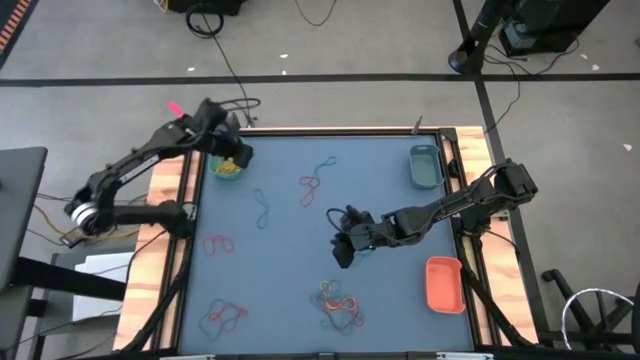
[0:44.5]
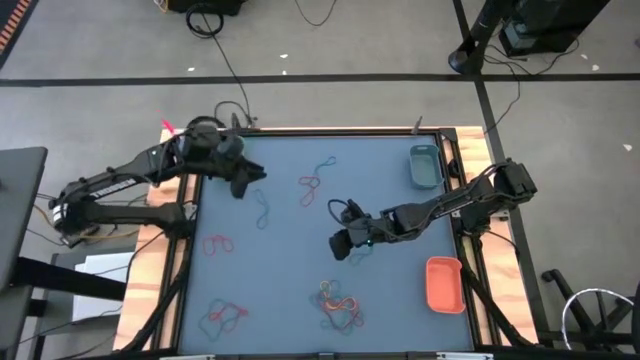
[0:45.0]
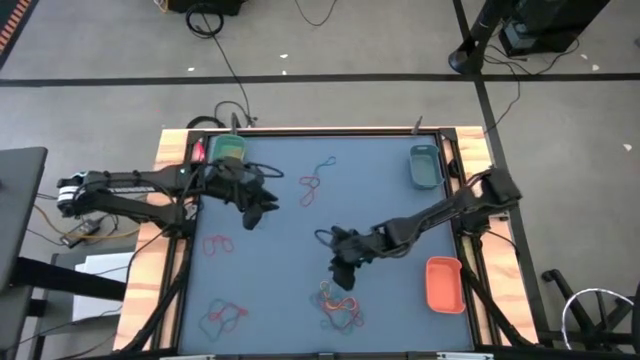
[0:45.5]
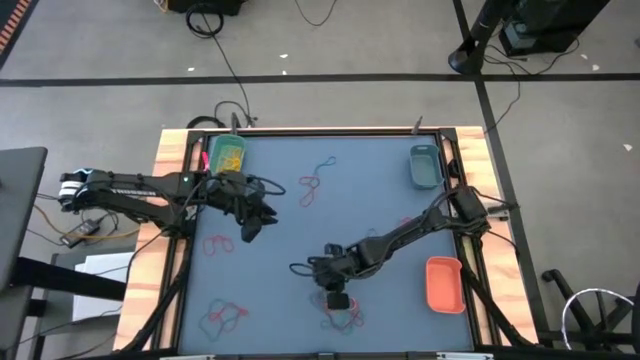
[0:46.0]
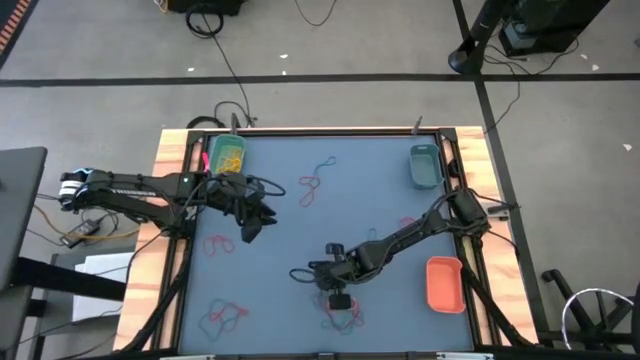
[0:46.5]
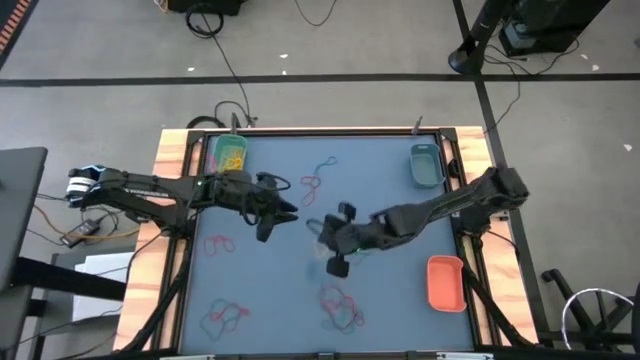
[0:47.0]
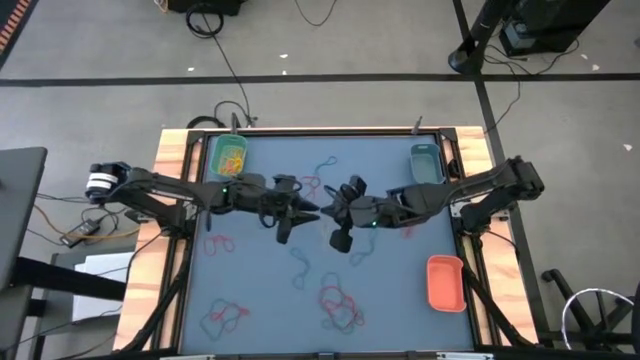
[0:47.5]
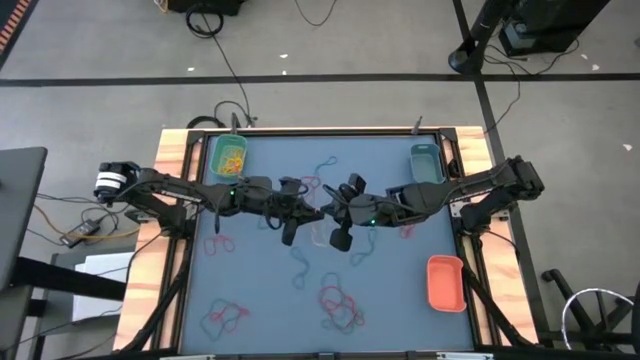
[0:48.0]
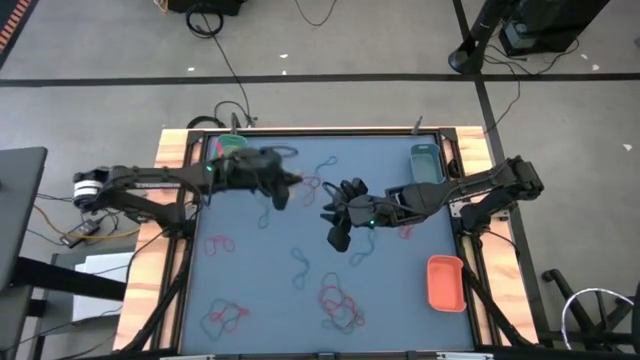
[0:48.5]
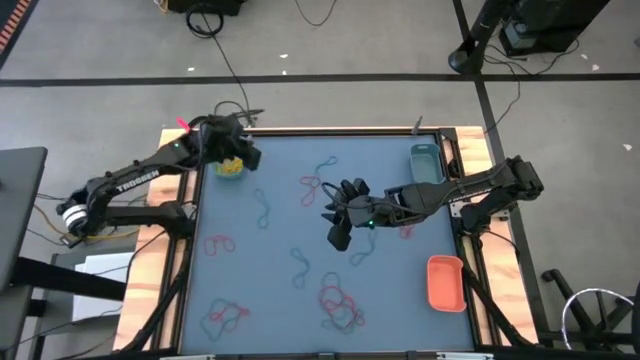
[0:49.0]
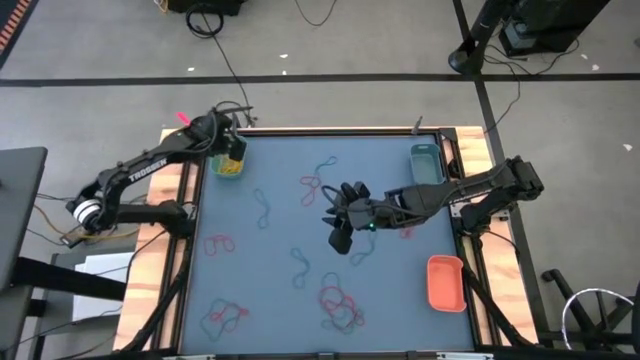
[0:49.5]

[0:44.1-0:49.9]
Task: Sort rubber bands into baskets
Put the yellow rubber band into the green bin

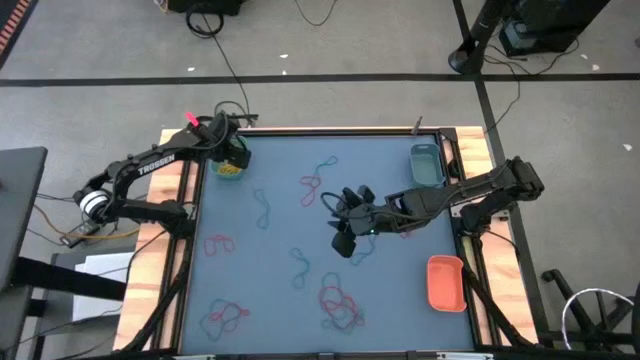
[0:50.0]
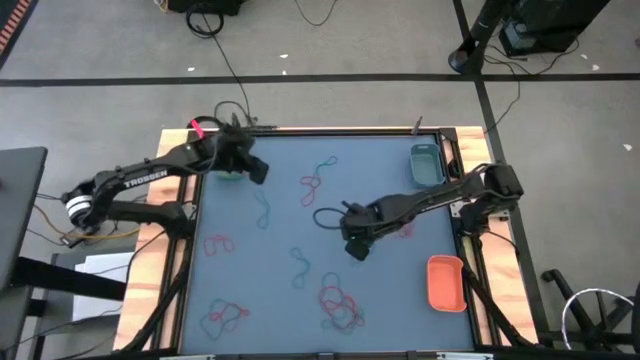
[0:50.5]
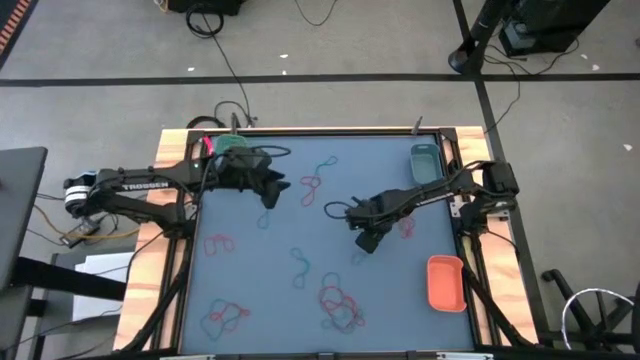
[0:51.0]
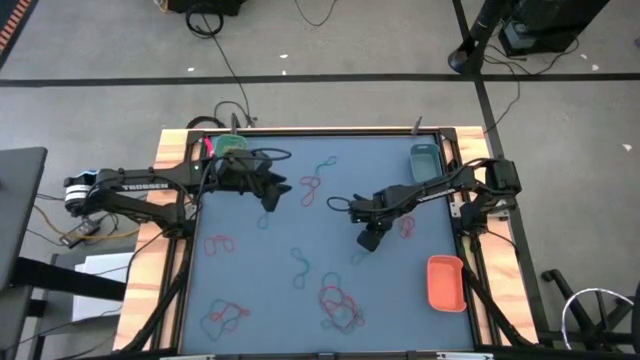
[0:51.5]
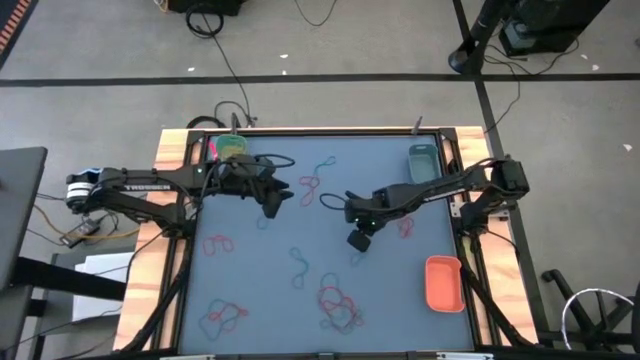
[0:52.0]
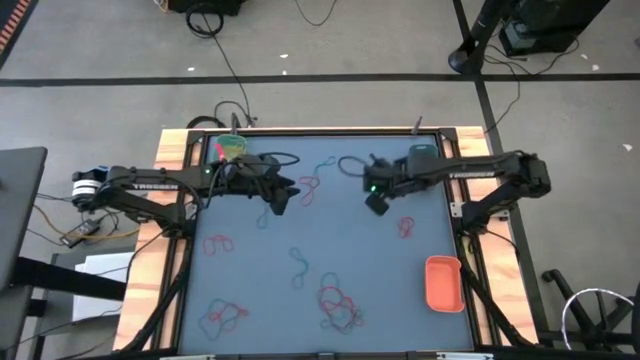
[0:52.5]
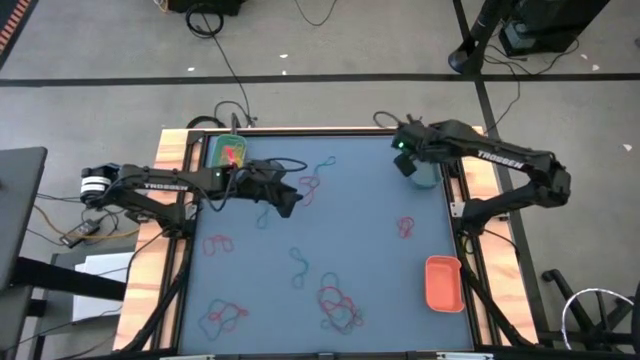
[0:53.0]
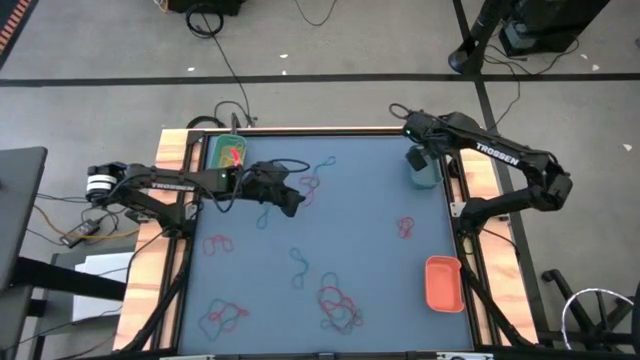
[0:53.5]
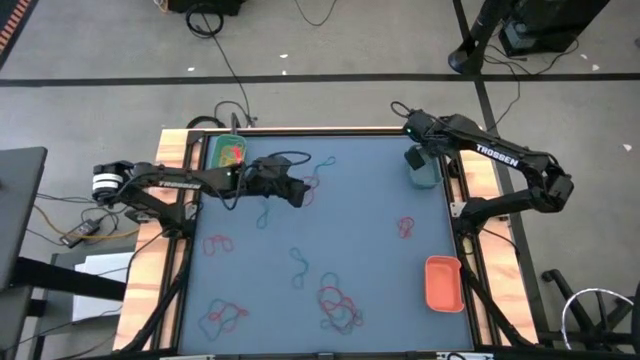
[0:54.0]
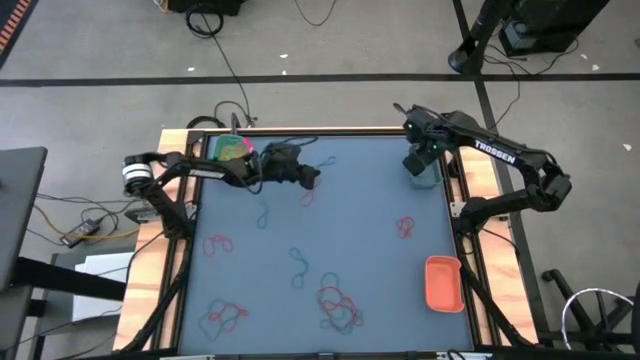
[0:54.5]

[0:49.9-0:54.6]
Put the blue rubber band into the blue bin

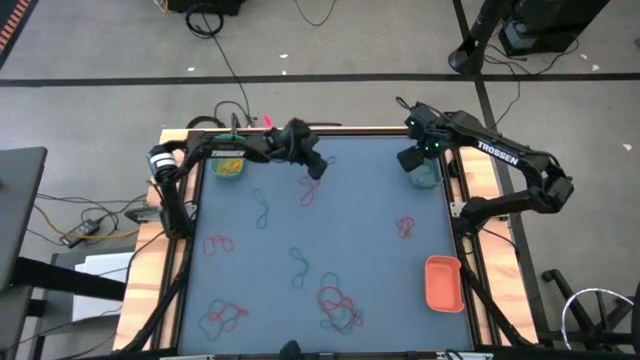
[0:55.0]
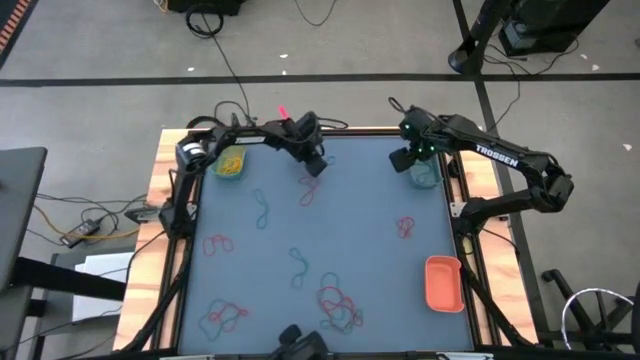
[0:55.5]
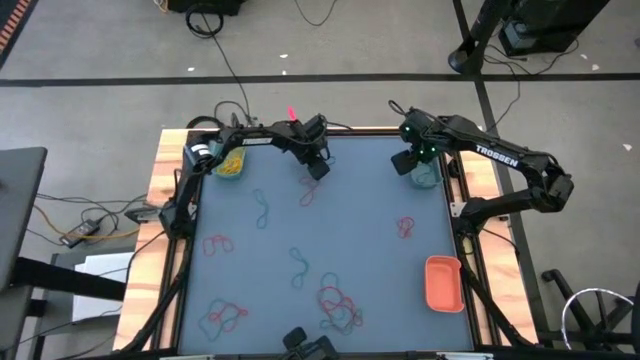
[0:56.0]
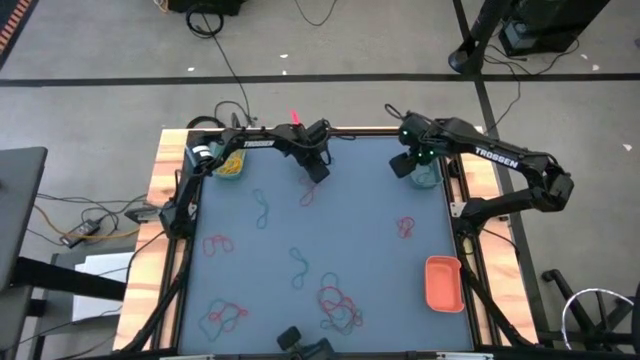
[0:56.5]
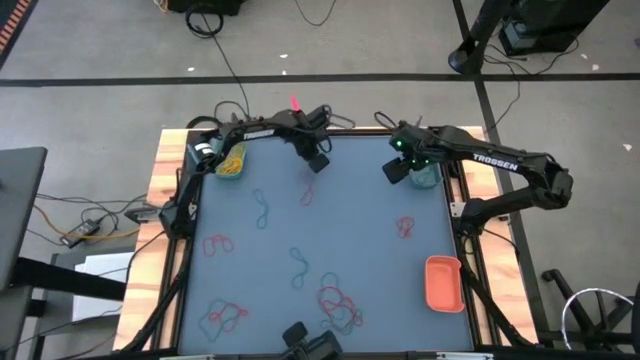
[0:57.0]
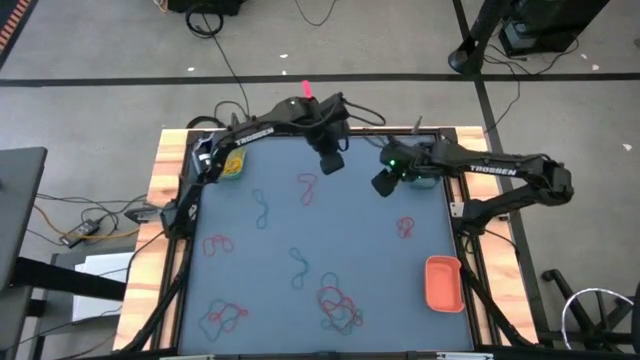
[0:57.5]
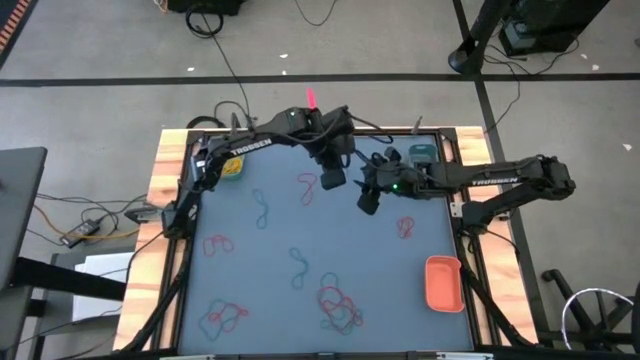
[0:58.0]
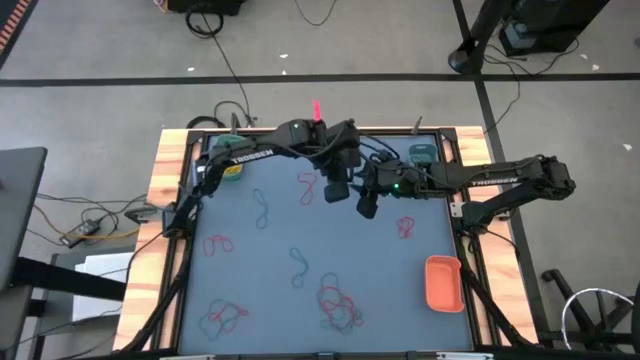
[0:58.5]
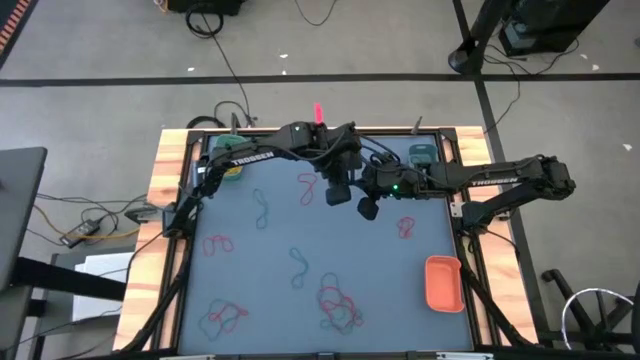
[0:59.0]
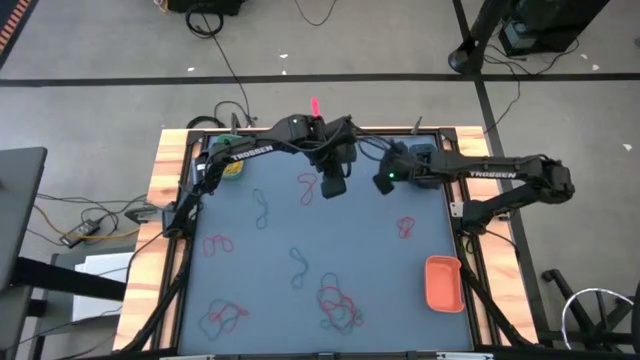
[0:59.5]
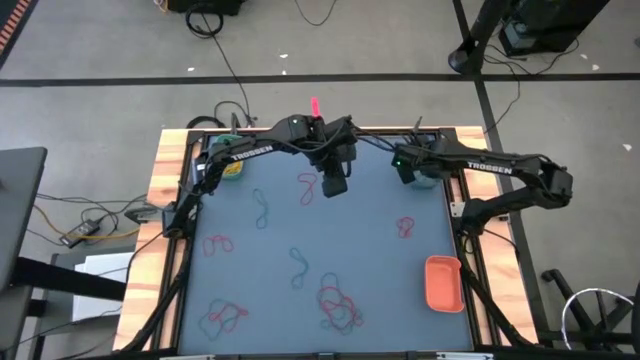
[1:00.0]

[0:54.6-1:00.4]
Put the blue rubber band into the blue bin

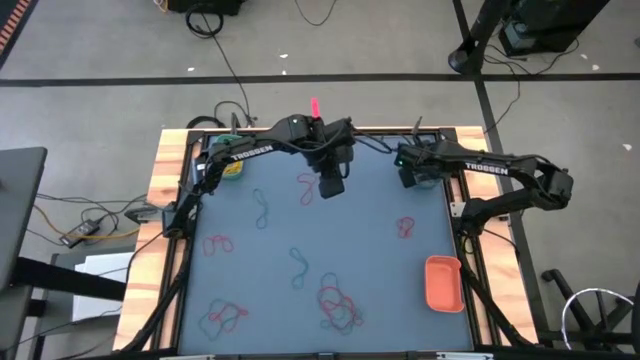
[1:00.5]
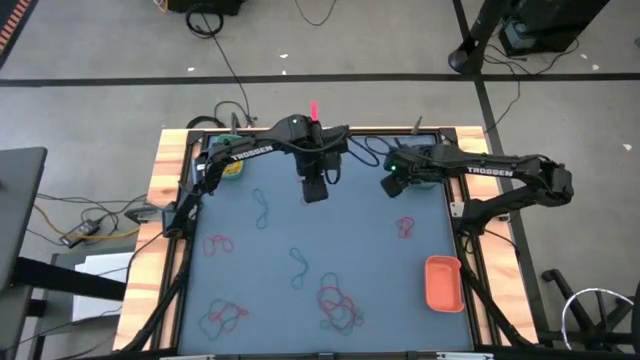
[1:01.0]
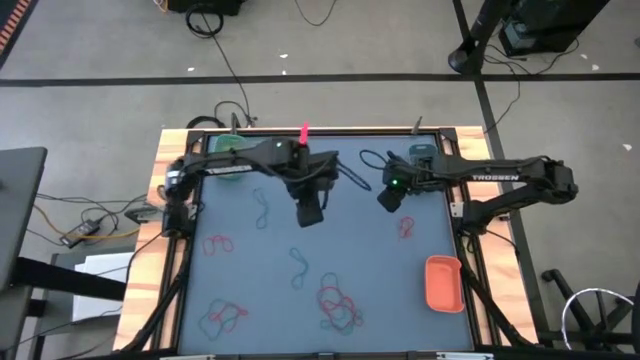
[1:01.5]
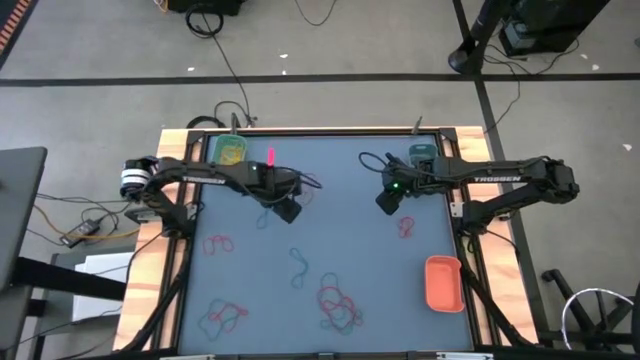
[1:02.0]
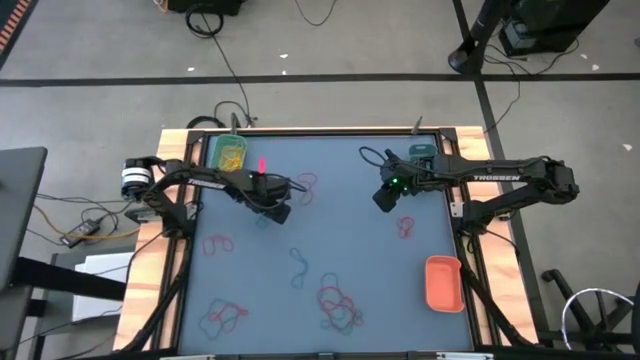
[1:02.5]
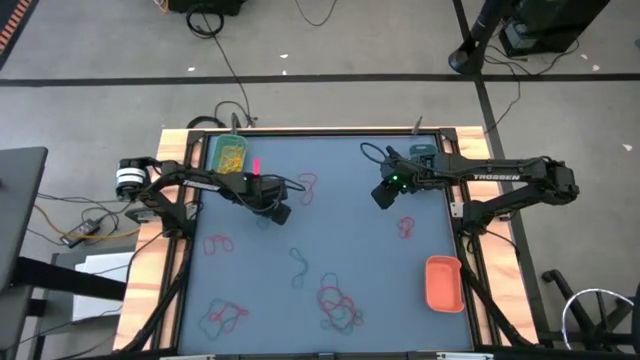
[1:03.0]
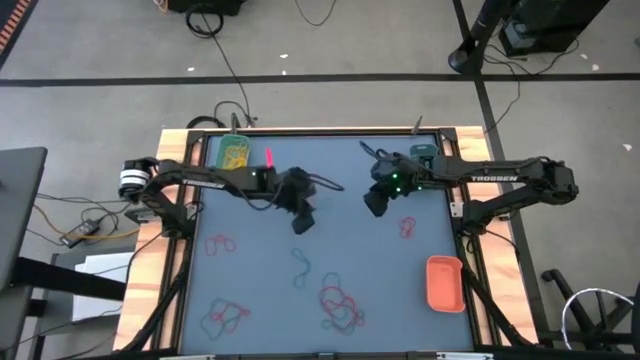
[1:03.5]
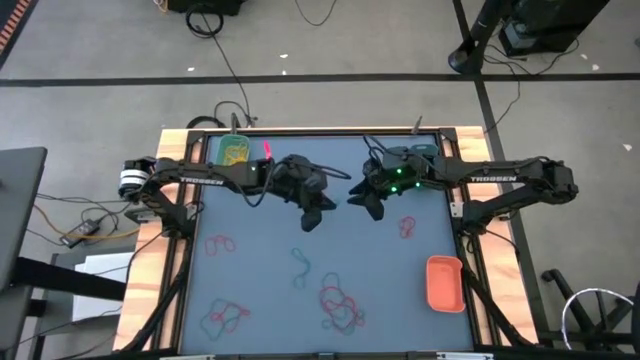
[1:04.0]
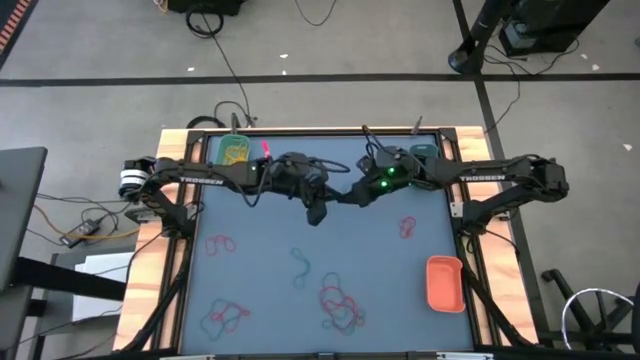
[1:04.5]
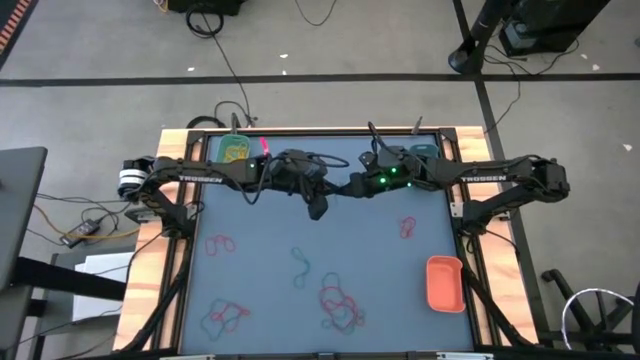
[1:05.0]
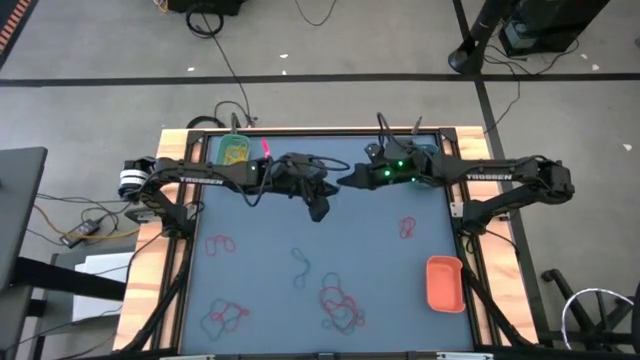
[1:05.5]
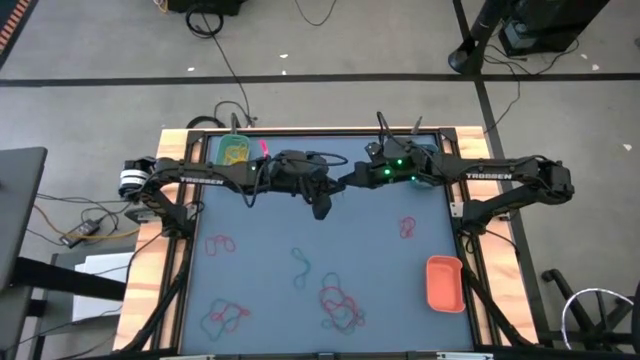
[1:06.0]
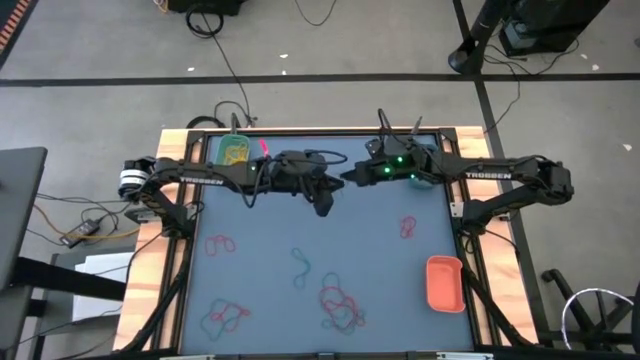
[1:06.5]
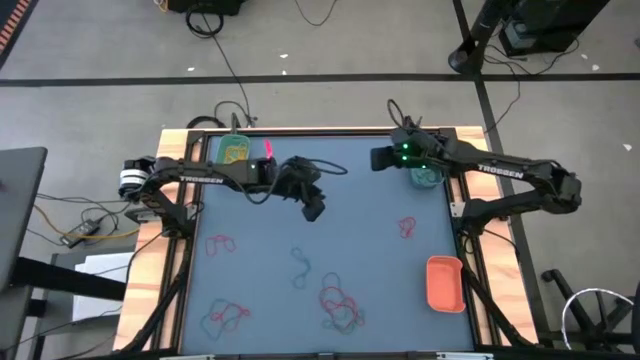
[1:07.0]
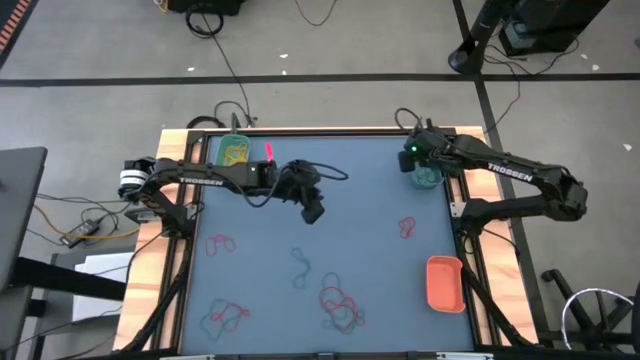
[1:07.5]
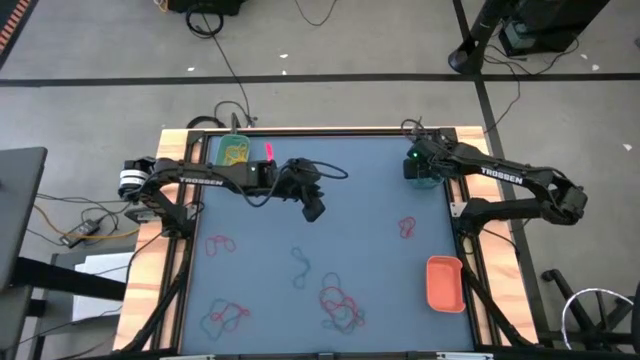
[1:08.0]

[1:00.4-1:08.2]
Put the blue rubber band into the blue bin
